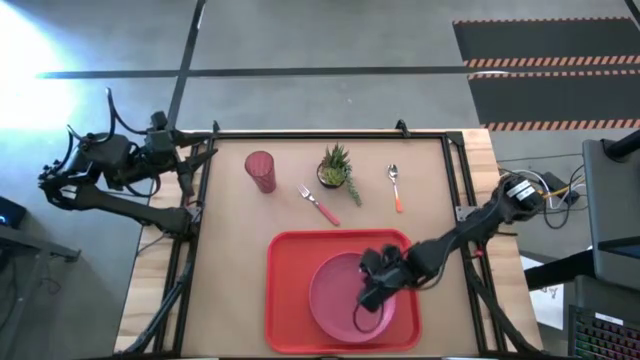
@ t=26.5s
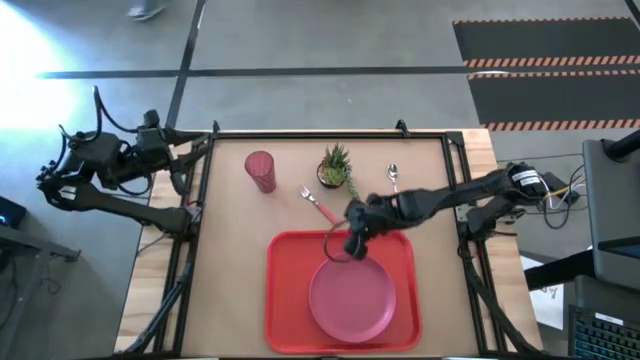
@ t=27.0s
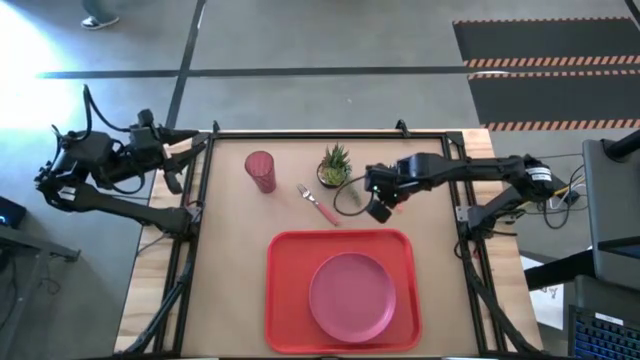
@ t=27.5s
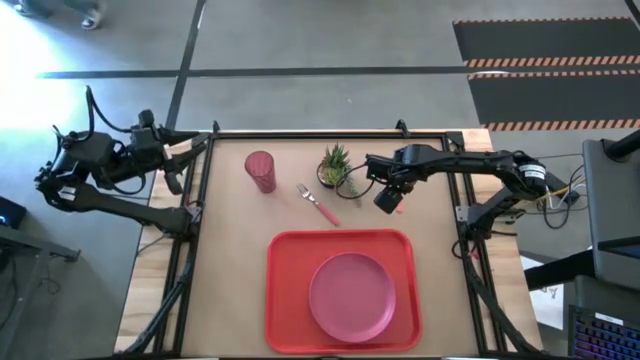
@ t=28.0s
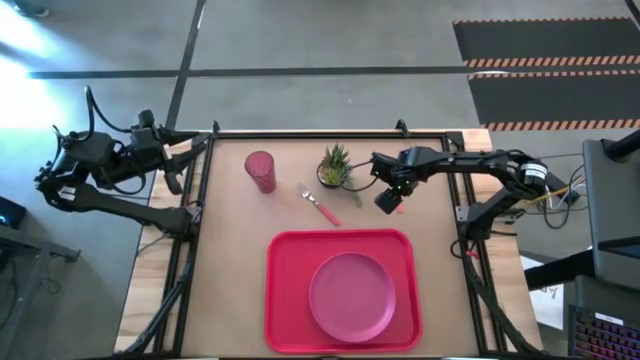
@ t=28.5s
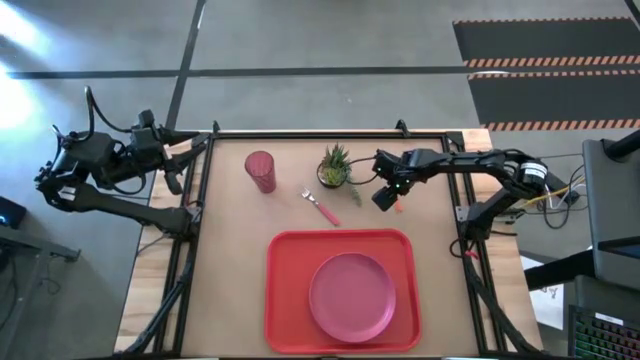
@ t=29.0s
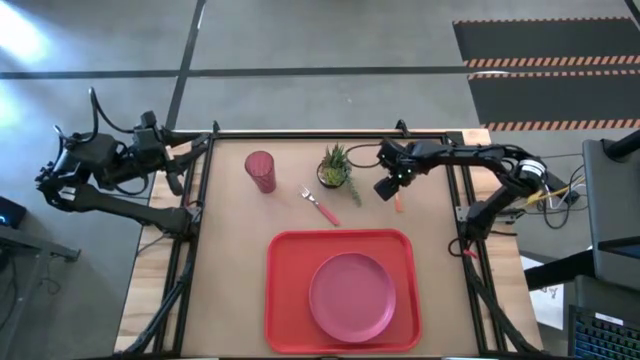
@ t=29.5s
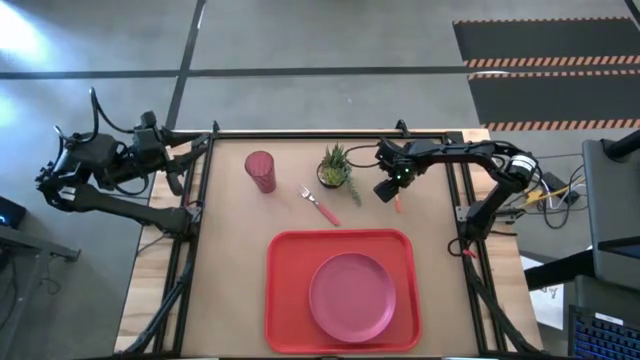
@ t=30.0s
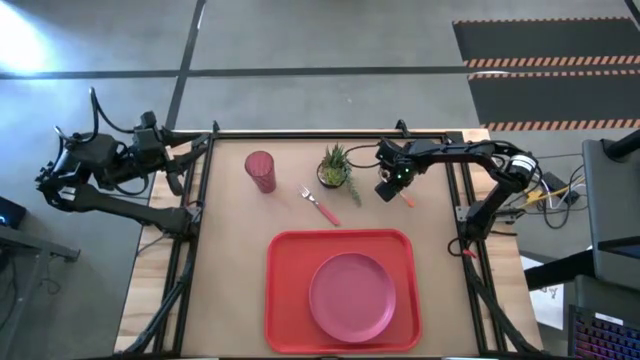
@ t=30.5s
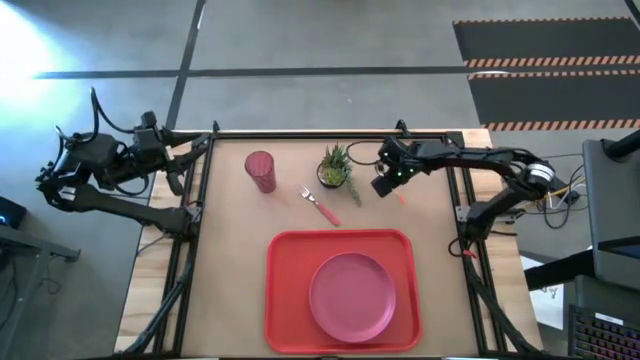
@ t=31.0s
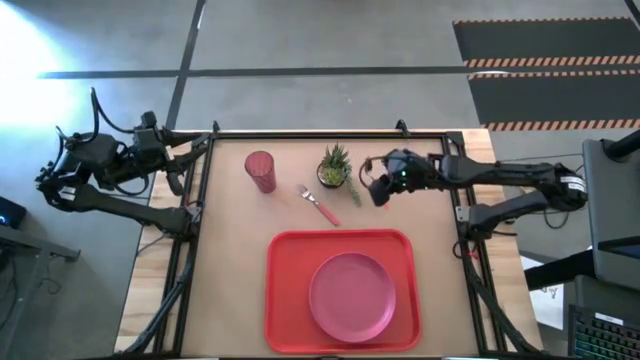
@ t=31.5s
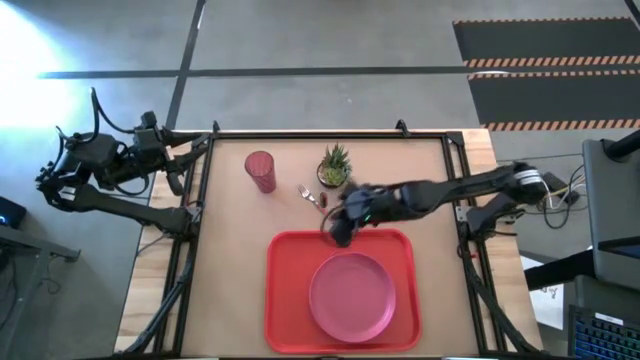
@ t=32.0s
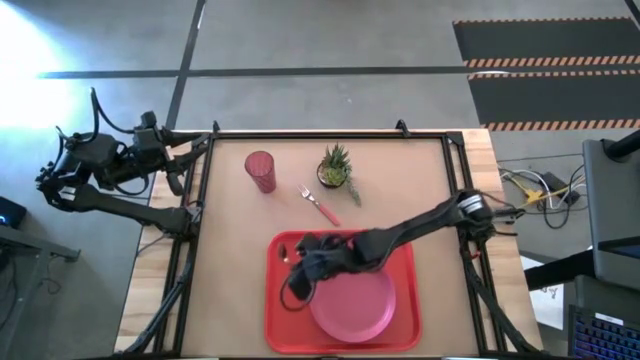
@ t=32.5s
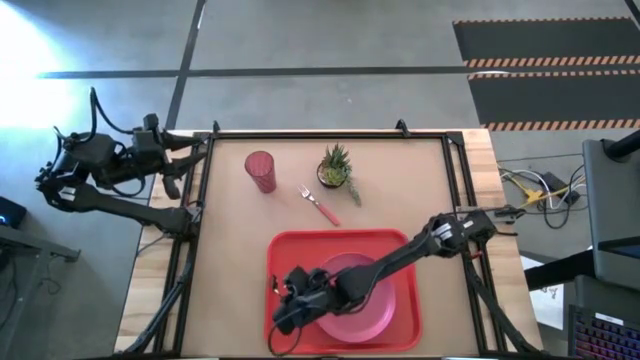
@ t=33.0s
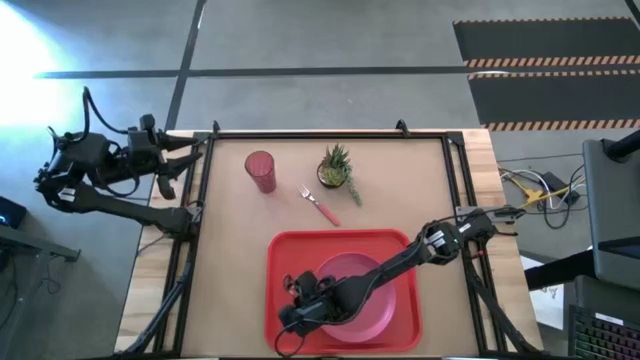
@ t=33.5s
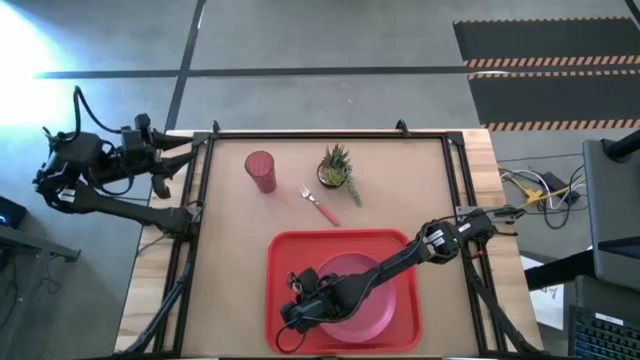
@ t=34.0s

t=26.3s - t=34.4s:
Task: Pick and place plate/cup/fork/spoon on tray
Put the orange spoon on the orange tray at the right of the pink plate

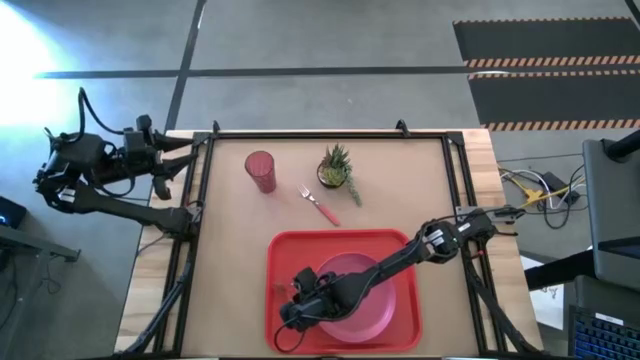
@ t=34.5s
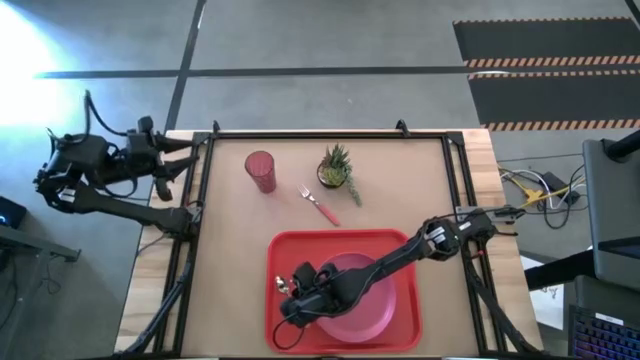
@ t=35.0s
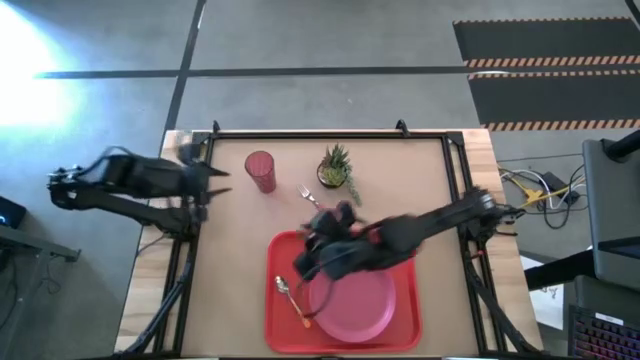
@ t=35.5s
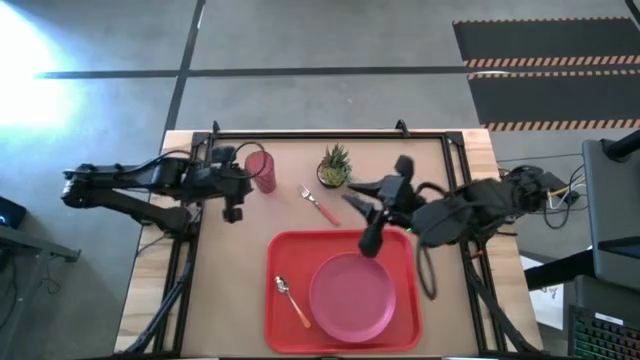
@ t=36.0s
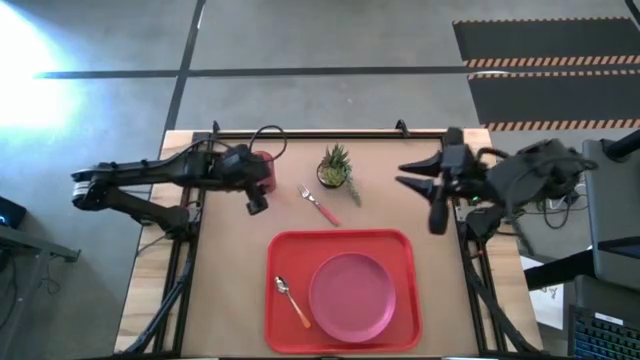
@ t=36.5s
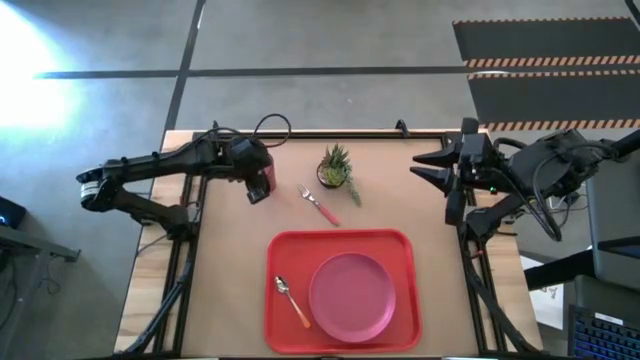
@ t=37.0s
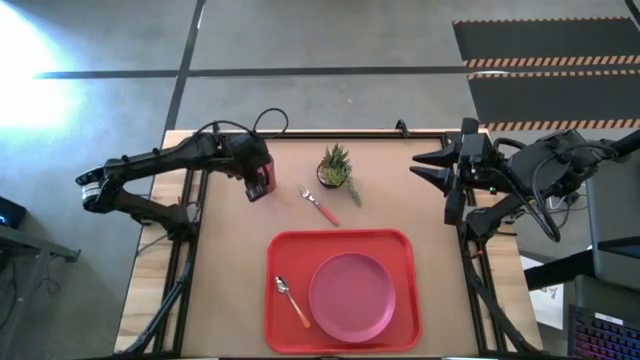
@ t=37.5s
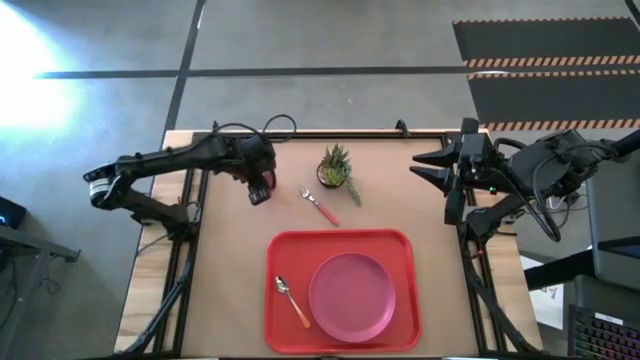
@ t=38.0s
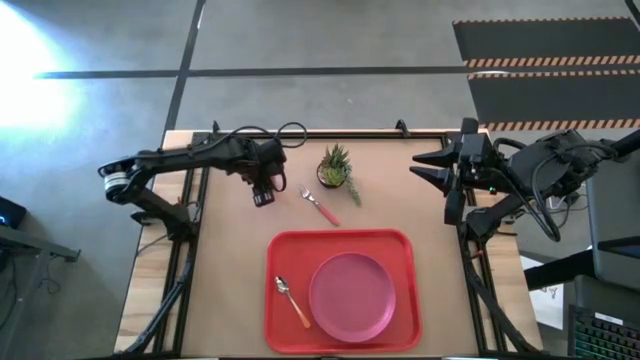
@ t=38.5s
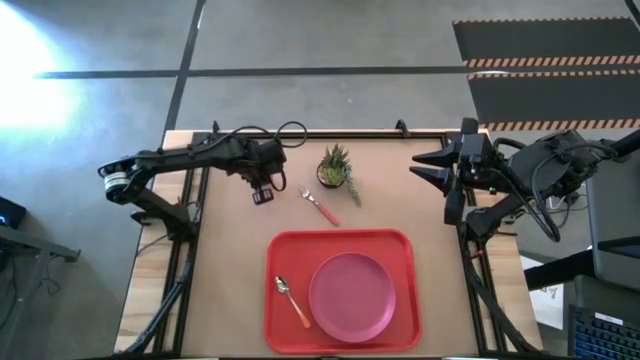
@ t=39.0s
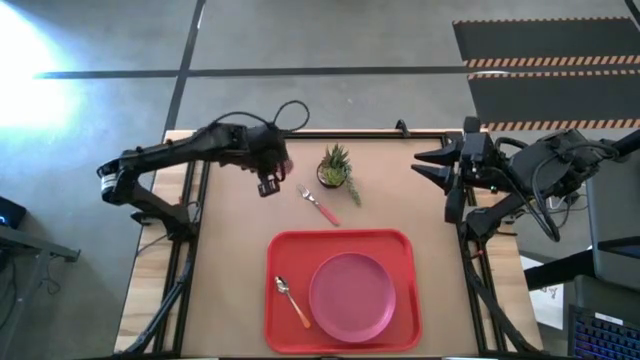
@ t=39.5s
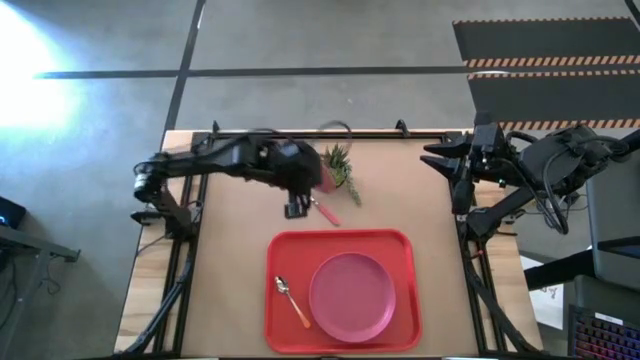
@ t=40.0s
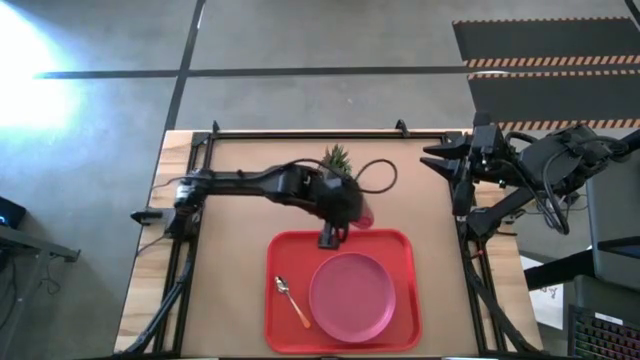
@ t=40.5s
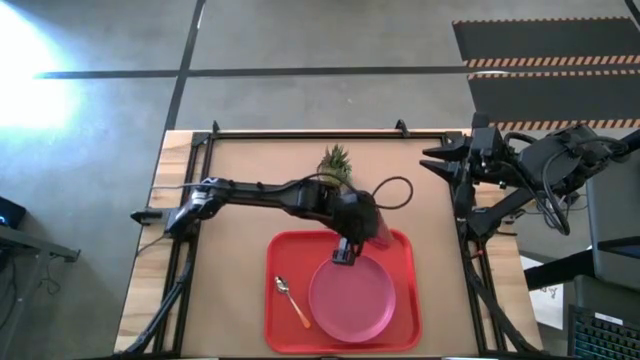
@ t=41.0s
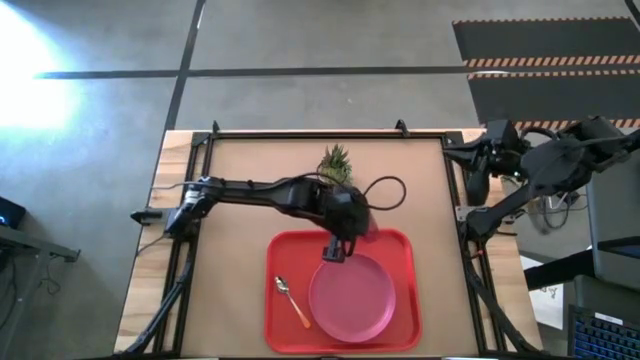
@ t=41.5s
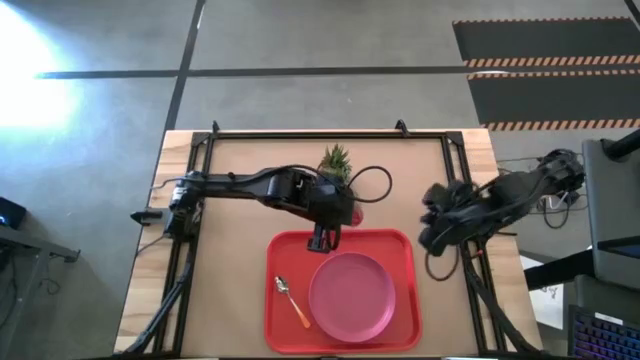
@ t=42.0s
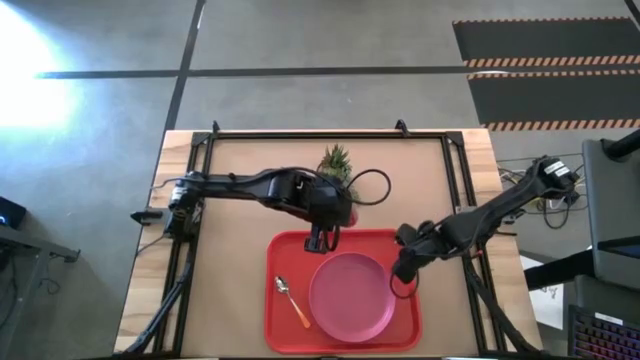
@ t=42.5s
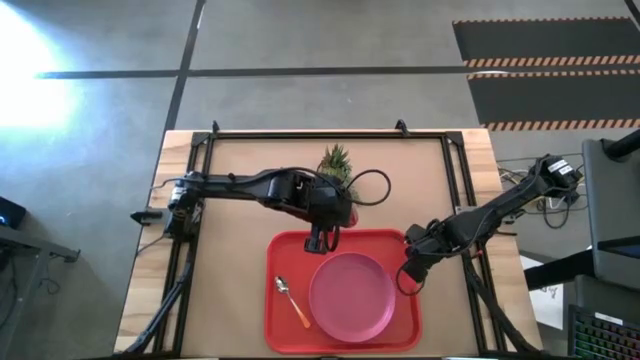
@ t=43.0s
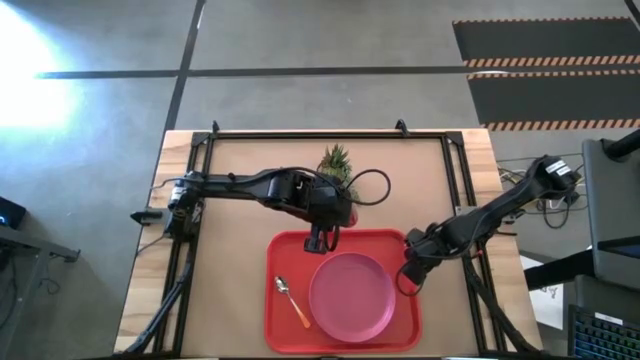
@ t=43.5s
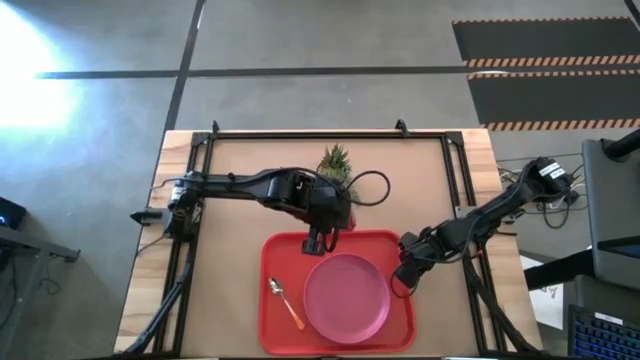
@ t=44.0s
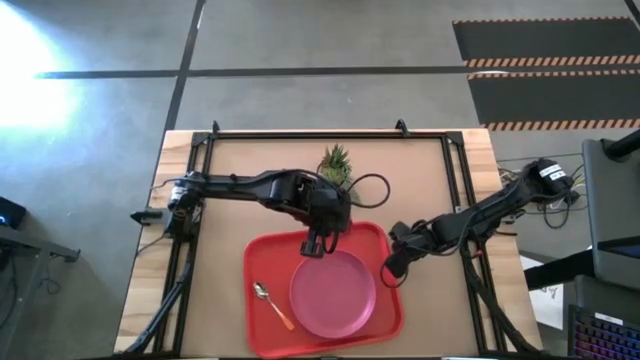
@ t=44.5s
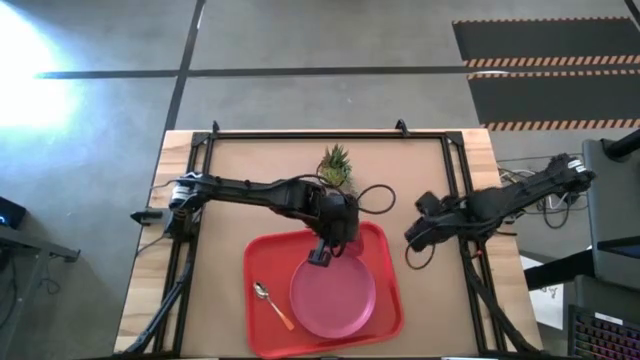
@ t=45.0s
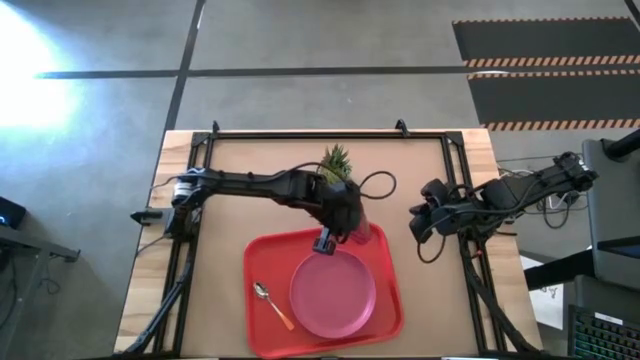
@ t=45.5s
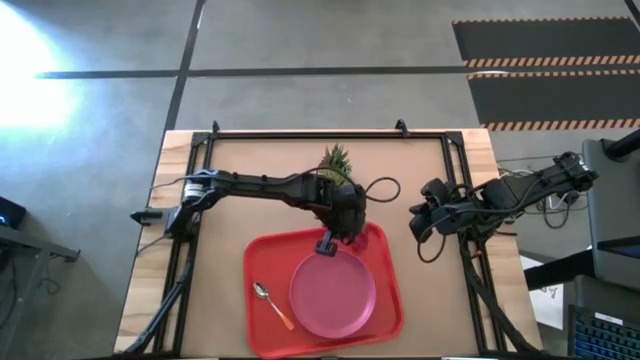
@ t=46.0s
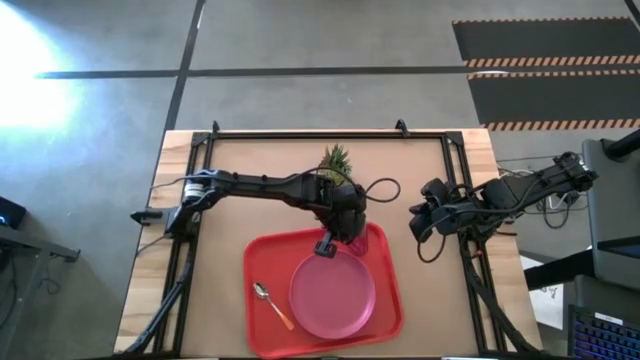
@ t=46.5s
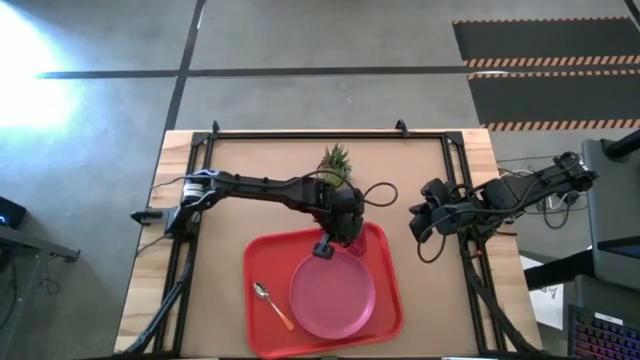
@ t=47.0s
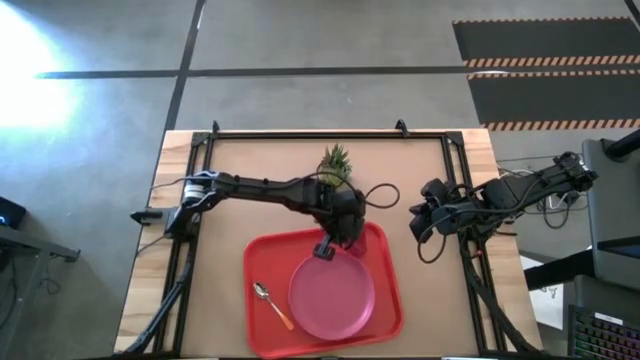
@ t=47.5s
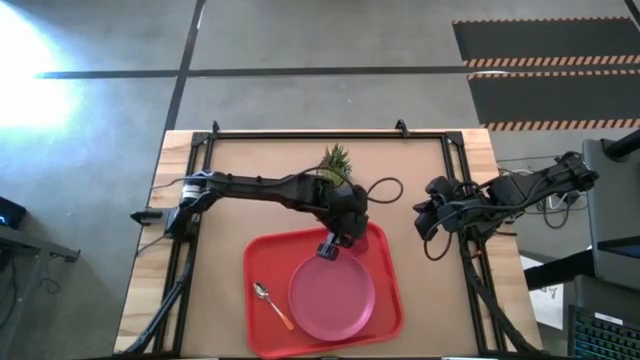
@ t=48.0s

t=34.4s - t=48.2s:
Put the pink glass on the top right of the orange tray
